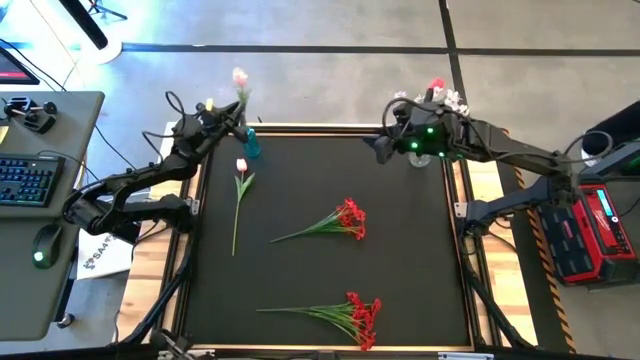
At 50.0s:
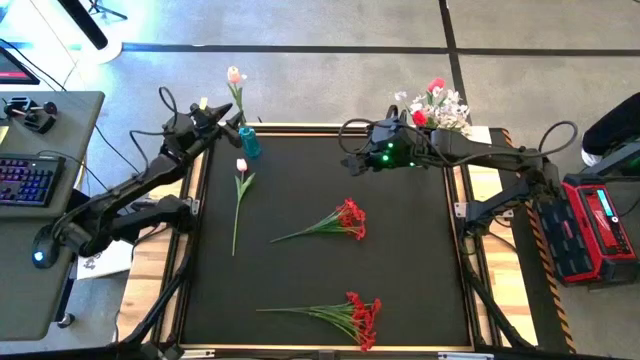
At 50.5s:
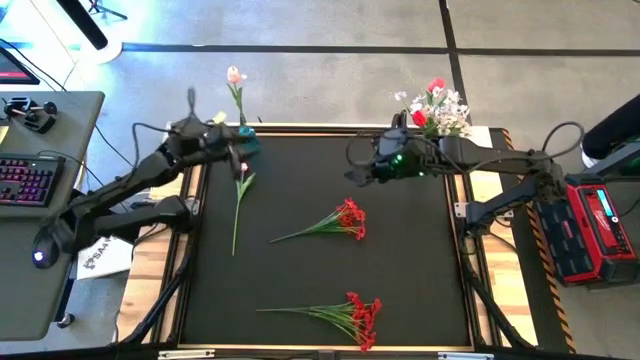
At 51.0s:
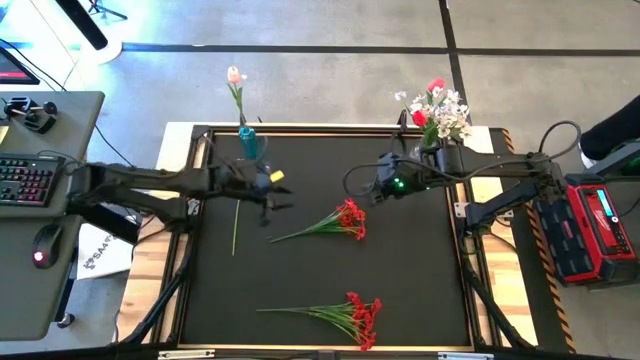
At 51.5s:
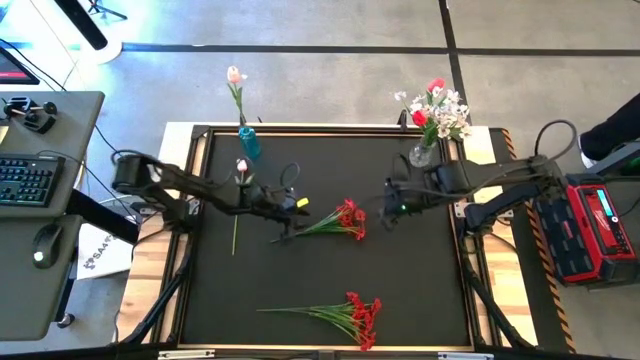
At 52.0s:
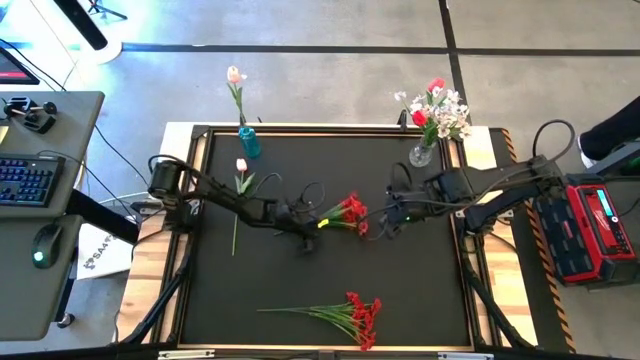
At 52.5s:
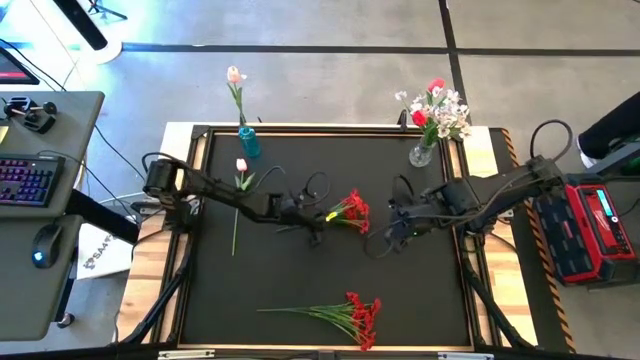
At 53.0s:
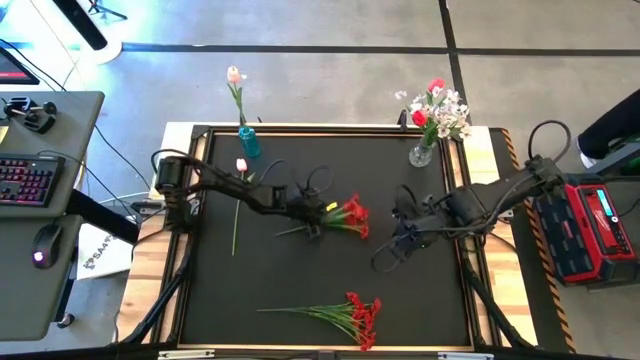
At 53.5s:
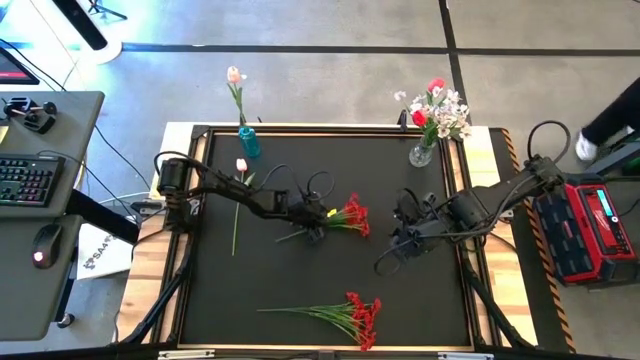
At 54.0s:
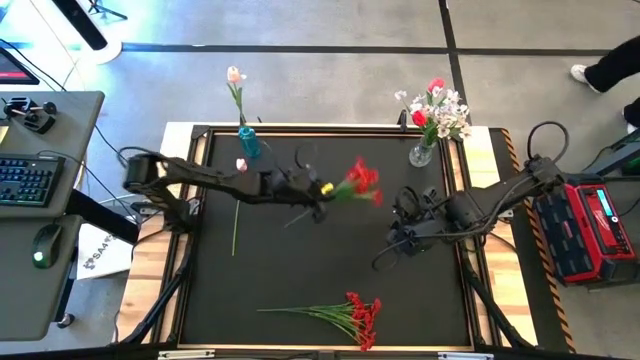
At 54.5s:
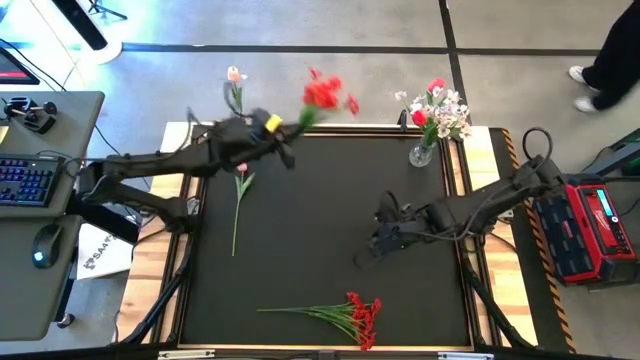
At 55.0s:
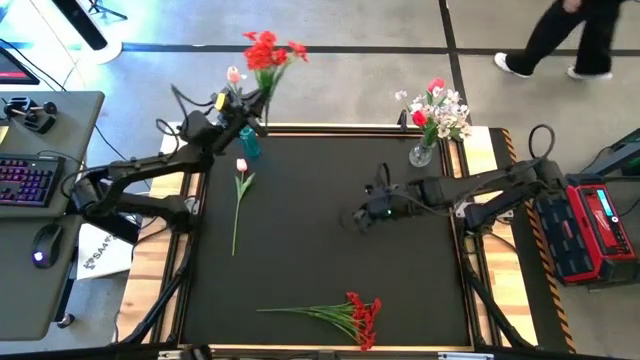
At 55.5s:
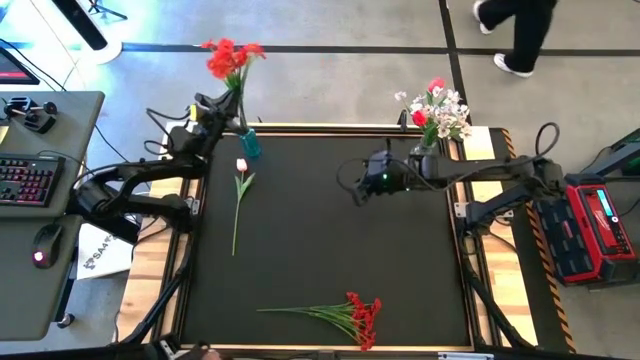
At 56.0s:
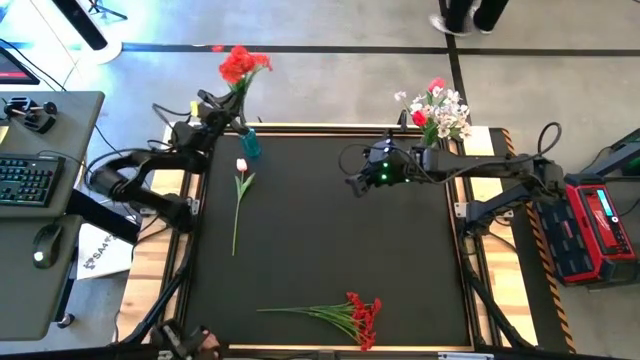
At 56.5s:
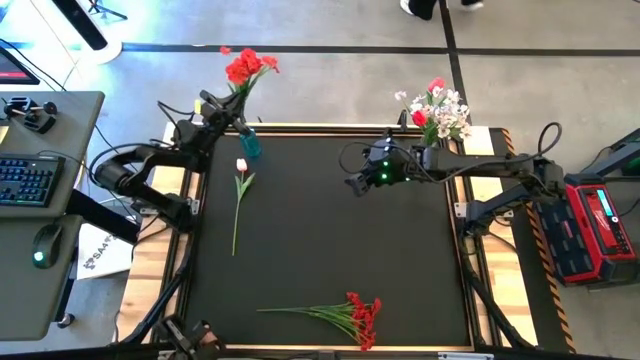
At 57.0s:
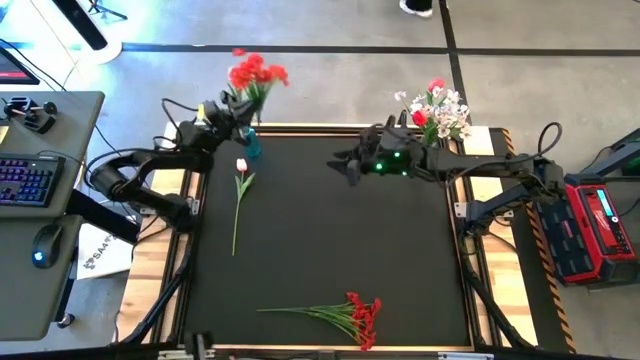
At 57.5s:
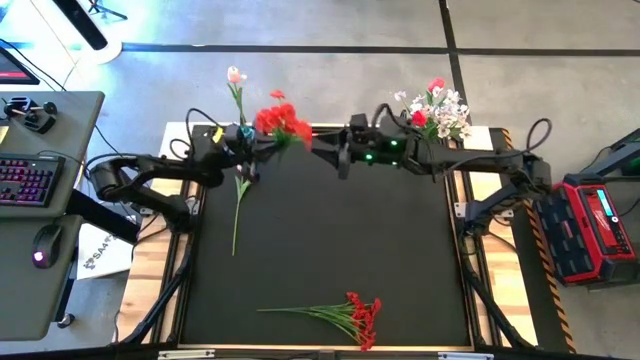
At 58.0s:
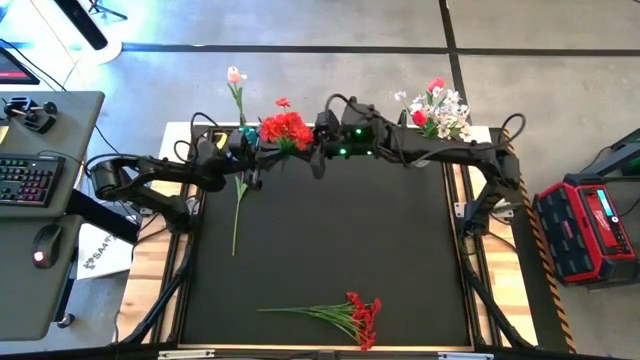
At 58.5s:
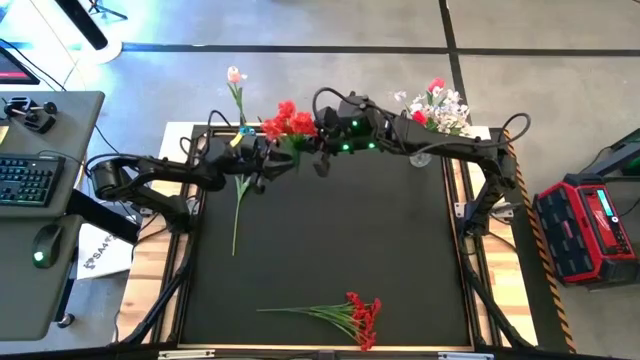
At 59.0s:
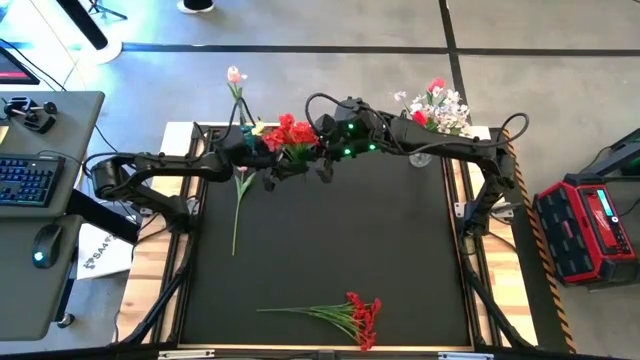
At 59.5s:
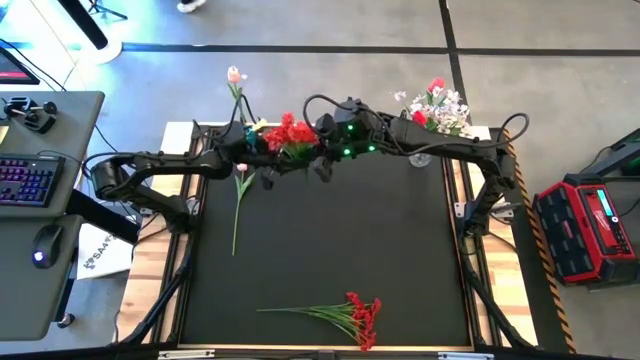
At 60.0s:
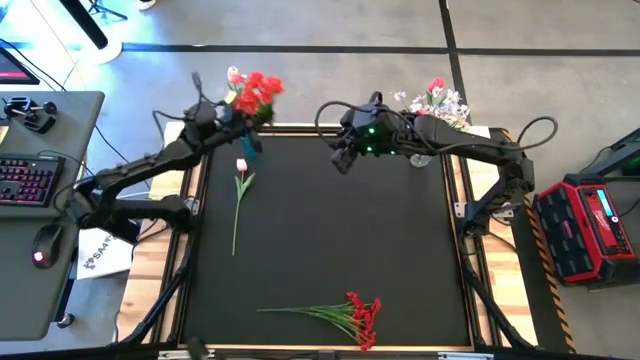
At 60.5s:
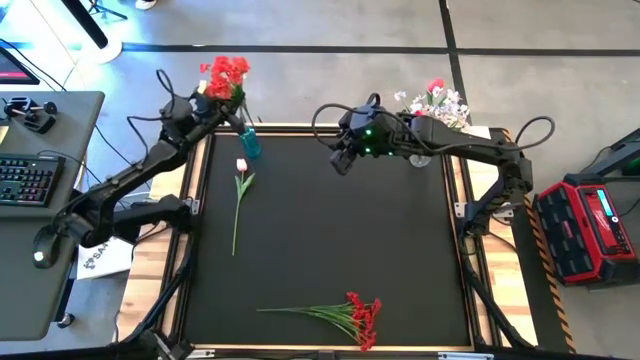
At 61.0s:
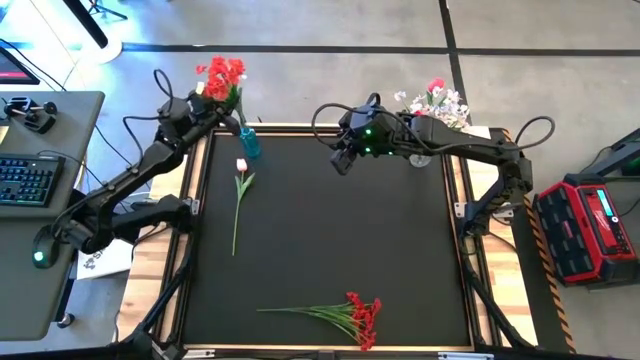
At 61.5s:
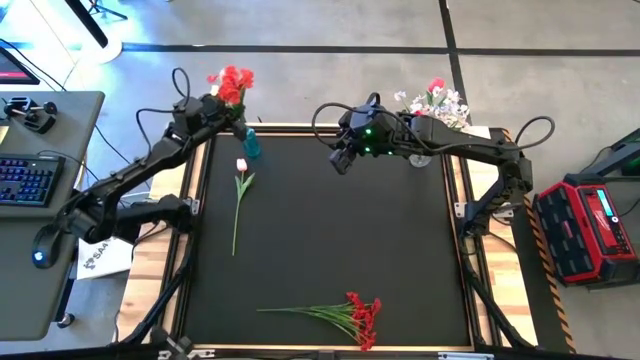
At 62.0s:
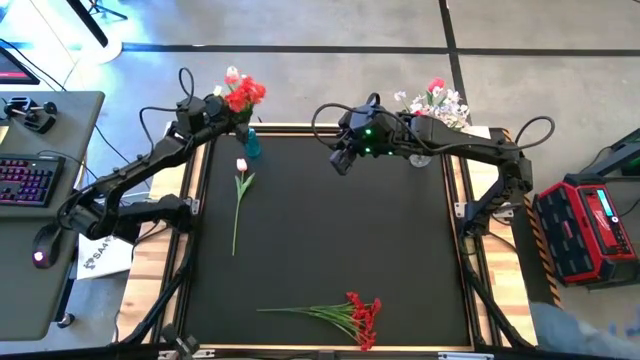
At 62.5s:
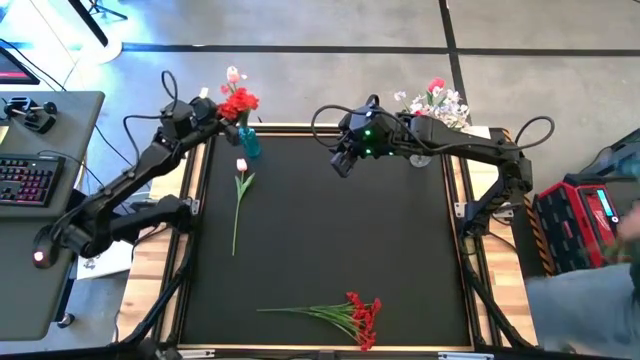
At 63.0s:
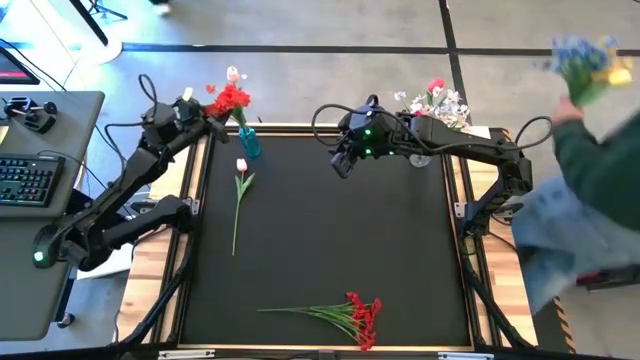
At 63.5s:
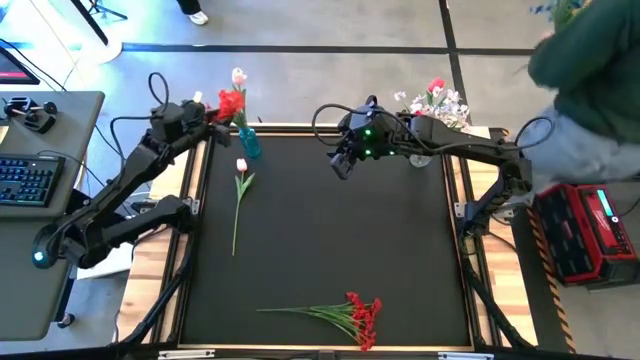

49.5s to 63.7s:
Task: Sort flowers into vase by color
Put the top red flowers into the blue vase

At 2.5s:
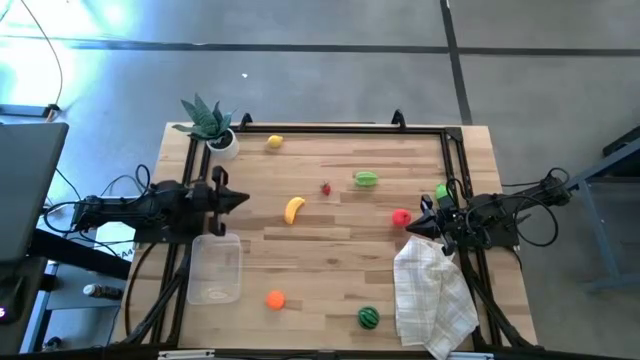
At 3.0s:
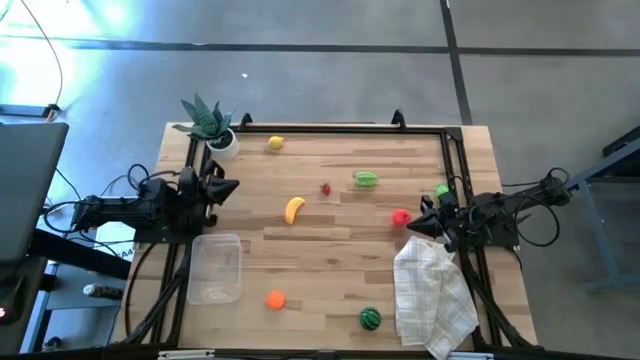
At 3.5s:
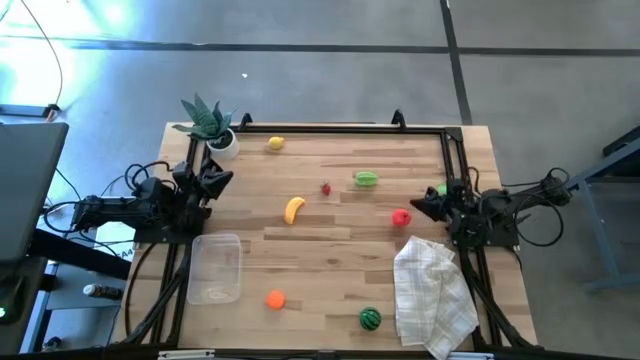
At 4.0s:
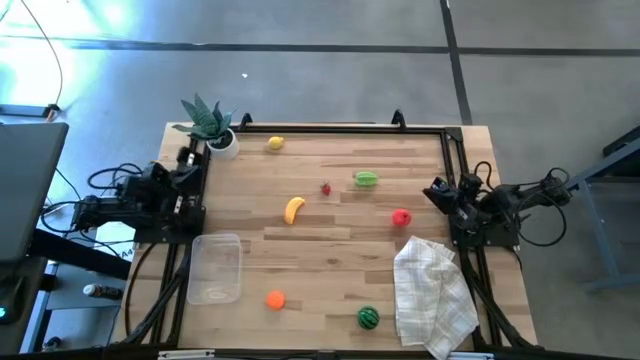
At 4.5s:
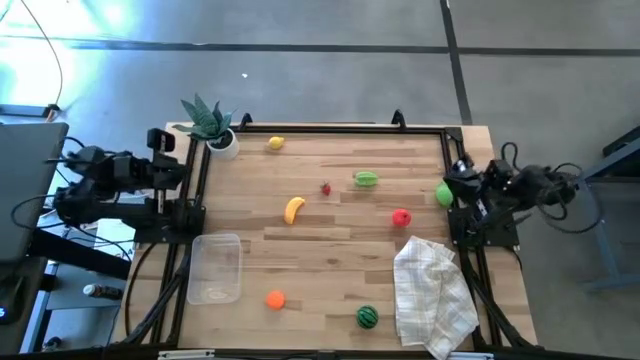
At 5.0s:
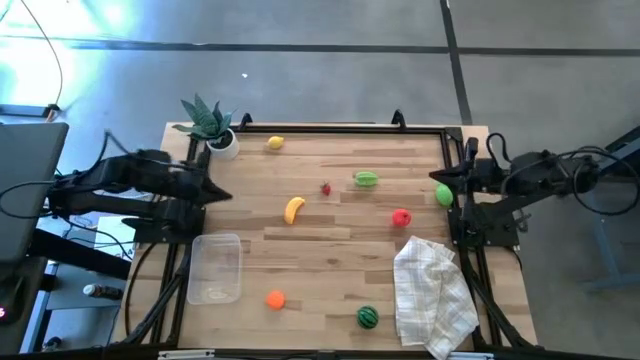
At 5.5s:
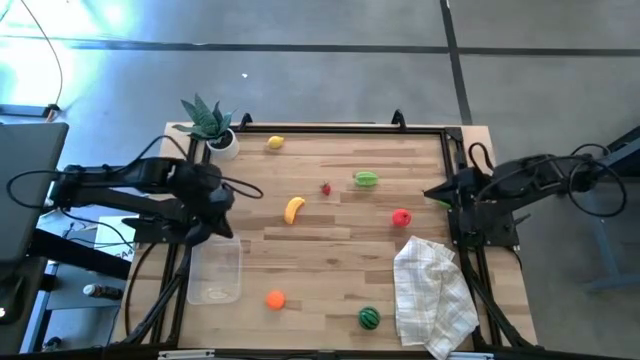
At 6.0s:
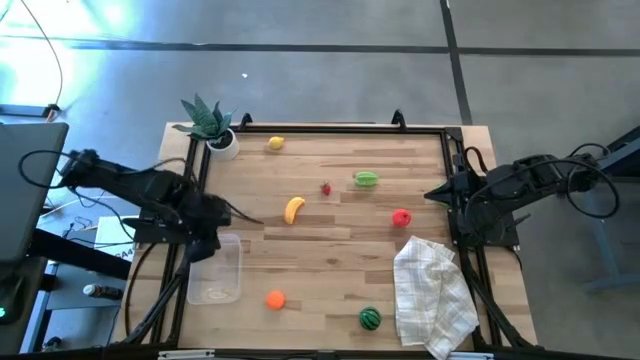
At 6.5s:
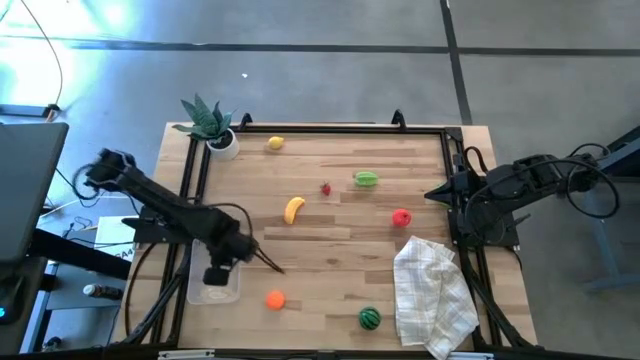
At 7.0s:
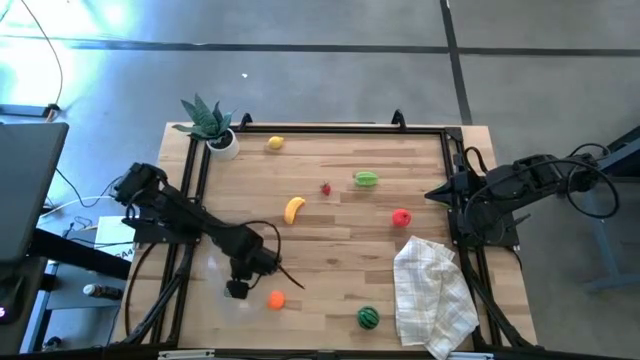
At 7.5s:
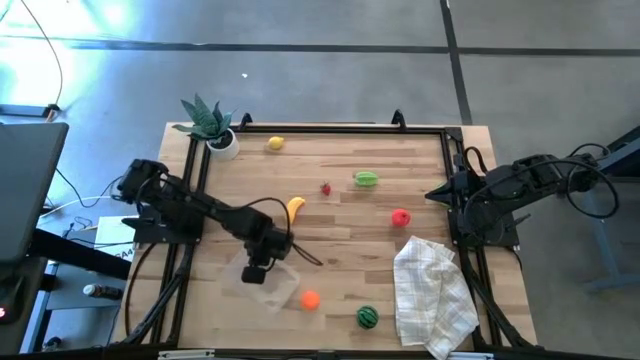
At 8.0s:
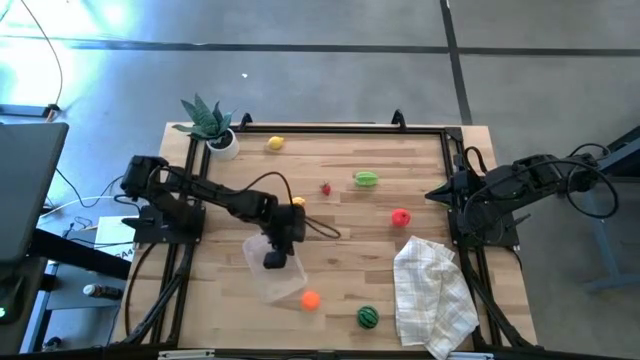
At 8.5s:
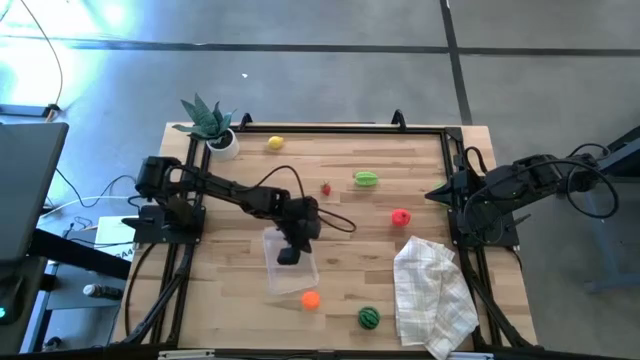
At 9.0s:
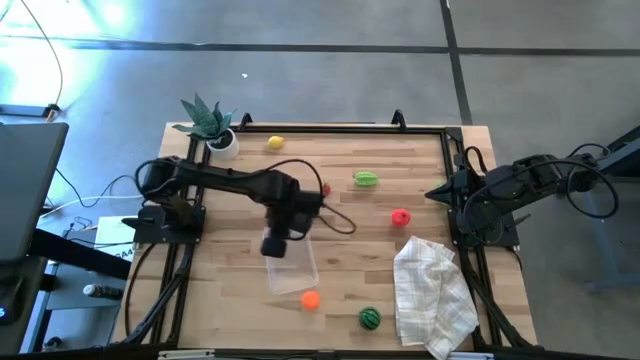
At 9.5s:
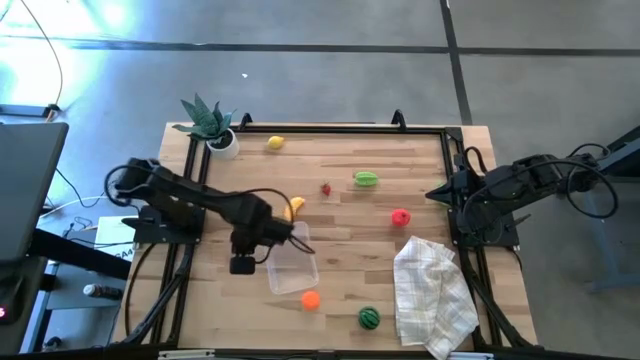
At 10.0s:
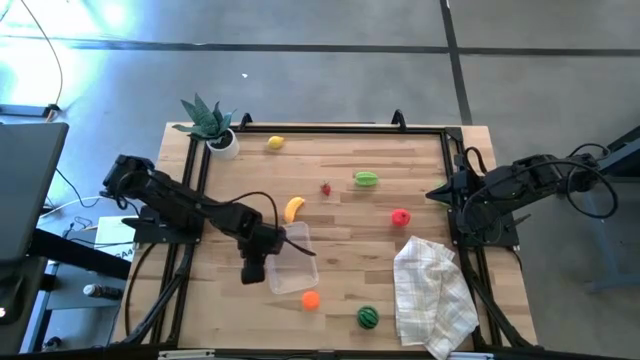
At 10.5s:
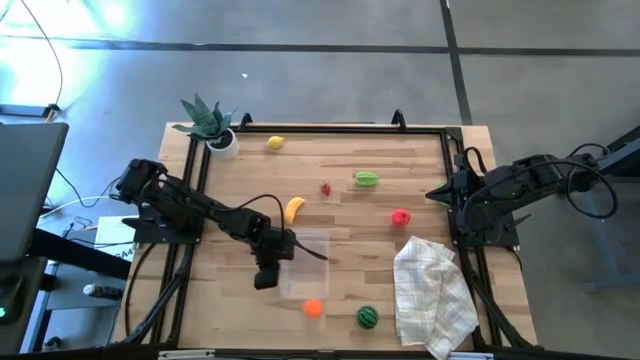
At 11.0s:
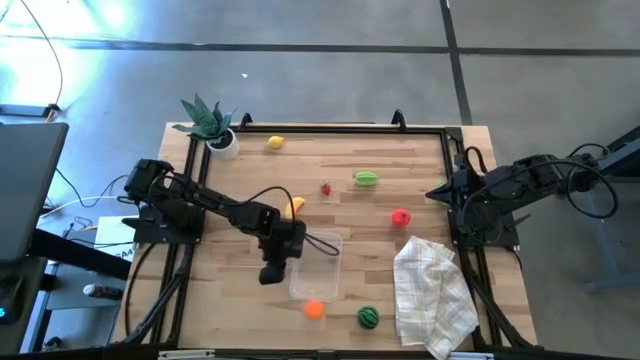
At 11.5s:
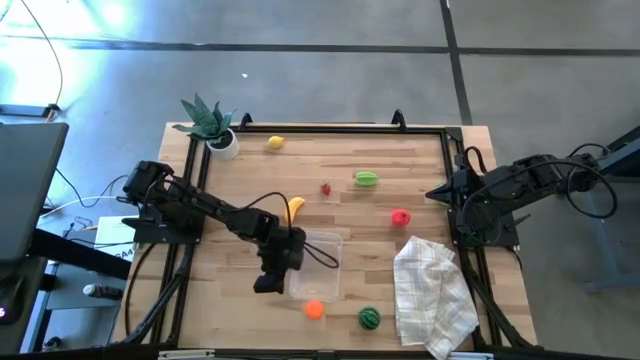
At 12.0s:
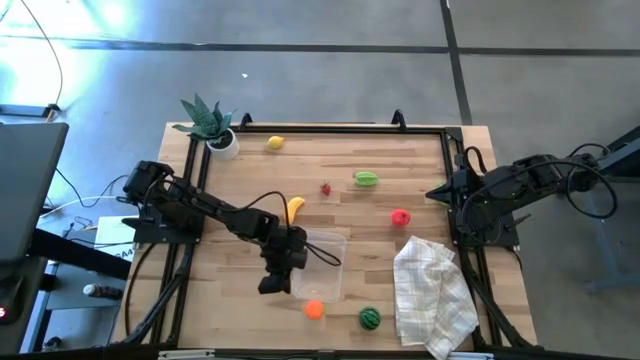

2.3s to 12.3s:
Task: Pick and placing Produce into tupperware
Move the transparent bin to the center of the table
